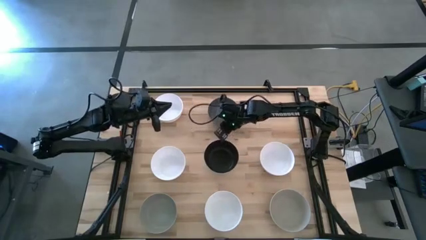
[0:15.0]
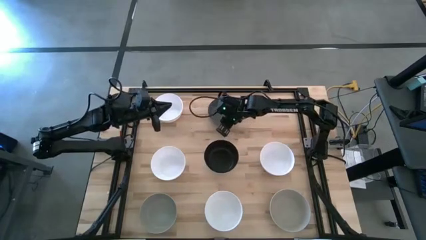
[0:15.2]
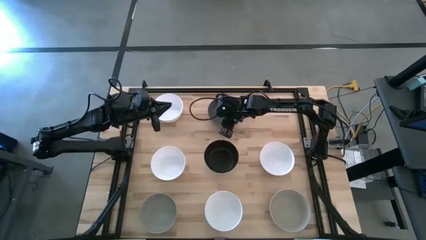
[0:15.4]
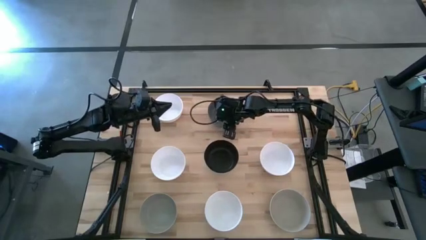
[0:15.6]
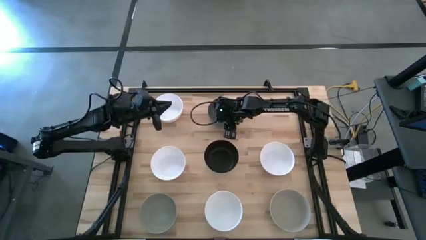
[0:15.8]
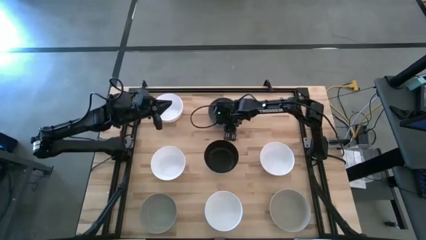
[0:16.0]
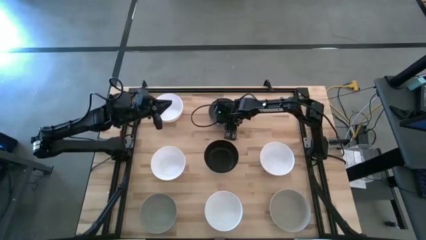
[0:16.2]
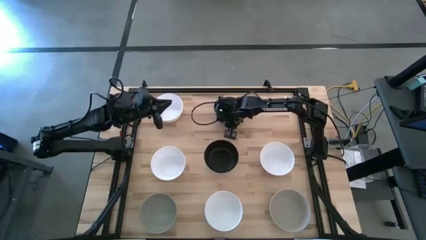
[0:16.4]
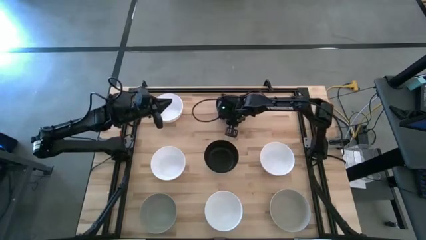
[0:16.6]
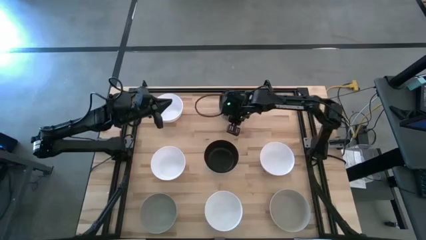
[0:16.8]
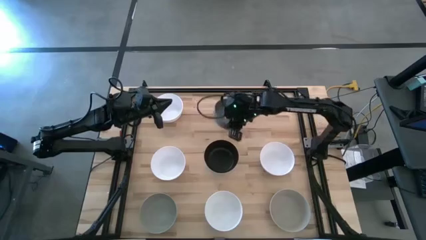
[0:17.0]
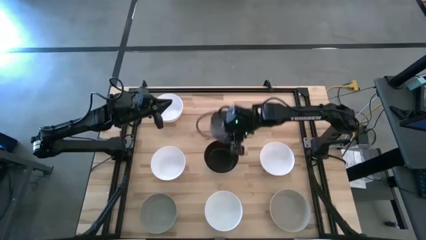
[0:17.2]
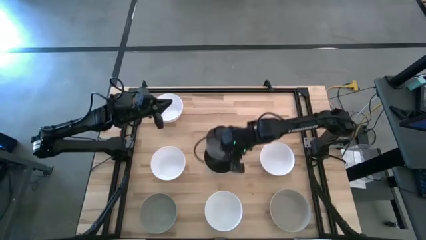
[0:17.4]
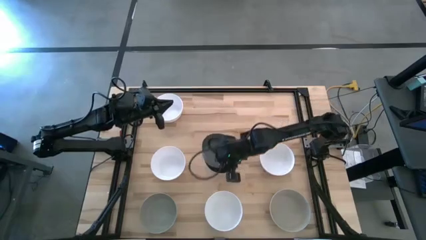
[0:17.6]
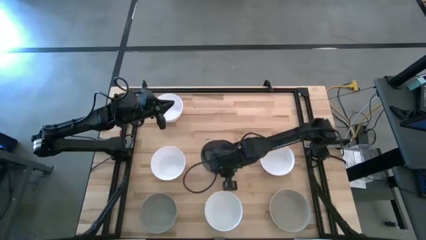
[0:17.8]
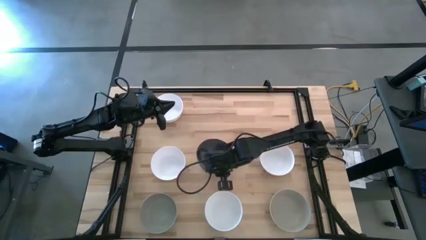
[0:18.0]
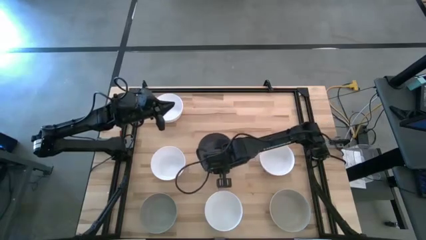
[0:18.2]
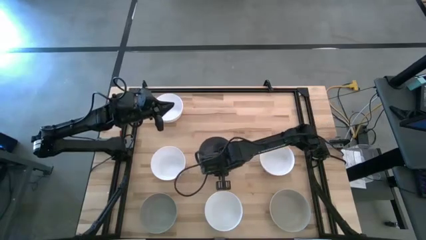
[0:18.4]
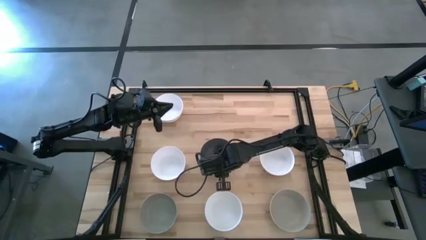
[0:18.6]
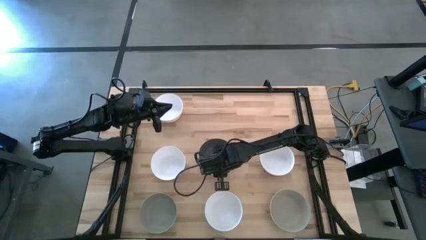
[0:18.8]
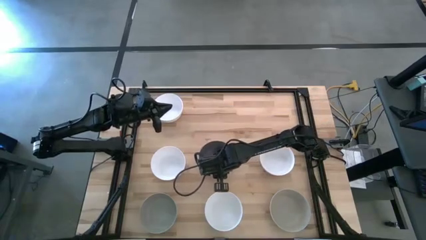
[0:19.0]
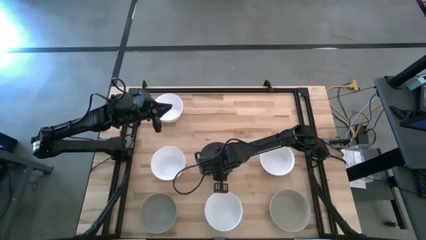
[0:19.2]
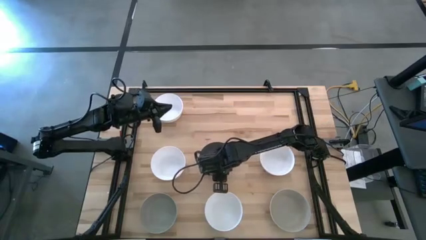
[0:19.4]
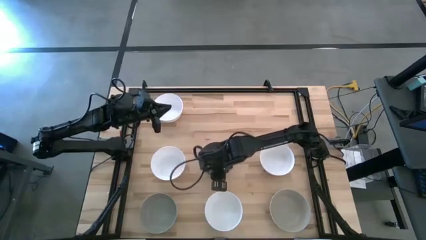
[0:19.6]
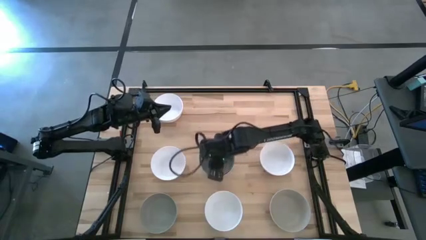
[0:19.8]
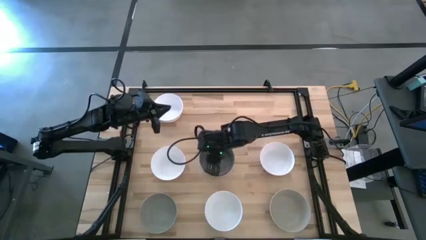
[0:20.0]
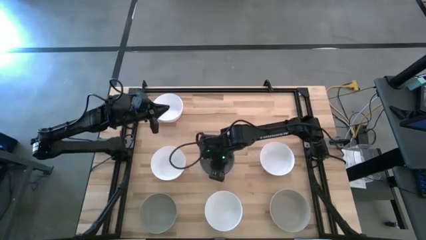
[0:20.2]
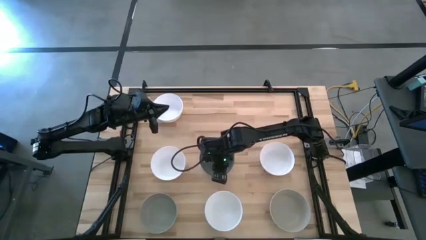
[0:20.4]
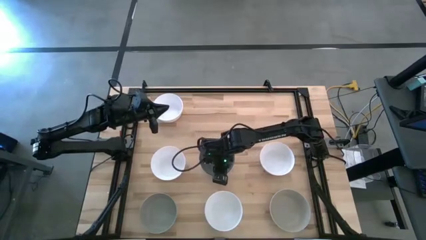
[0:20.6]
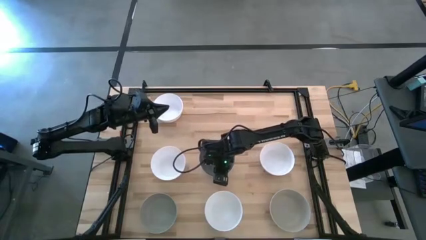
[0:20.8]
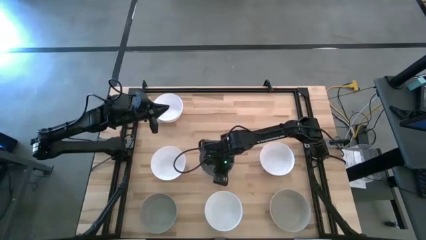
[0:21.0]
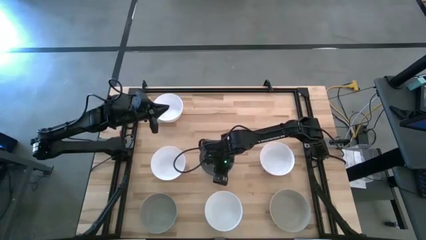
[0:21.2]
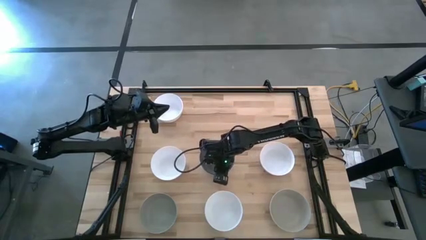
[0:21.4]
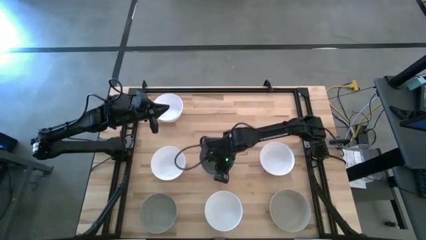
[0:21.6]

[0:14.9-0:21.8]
Task: Nest bowls inside each other
Stack the gray bowl on the black bowl

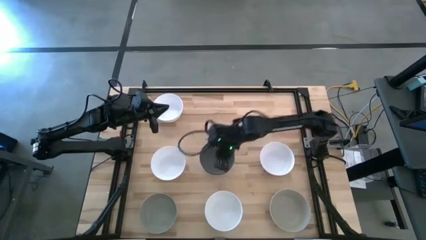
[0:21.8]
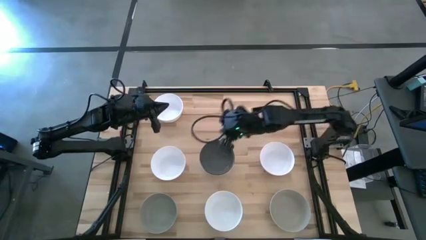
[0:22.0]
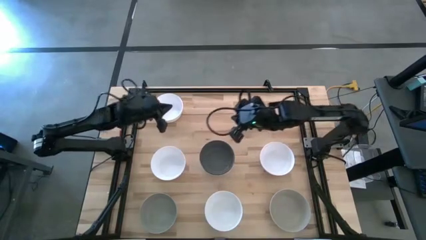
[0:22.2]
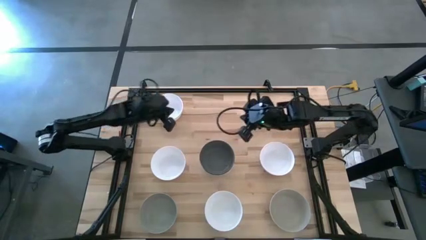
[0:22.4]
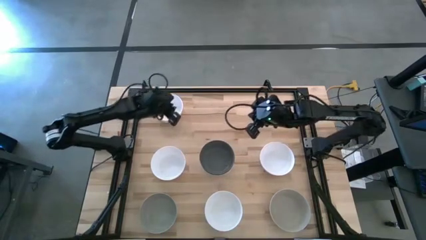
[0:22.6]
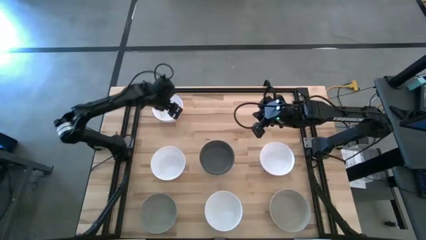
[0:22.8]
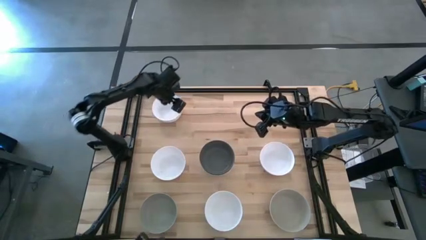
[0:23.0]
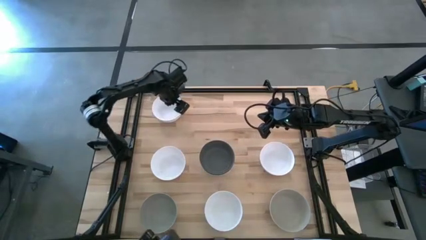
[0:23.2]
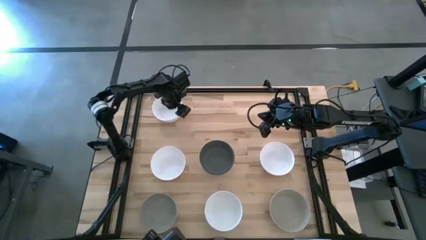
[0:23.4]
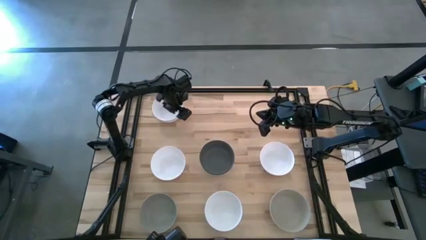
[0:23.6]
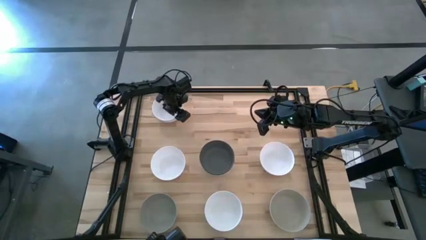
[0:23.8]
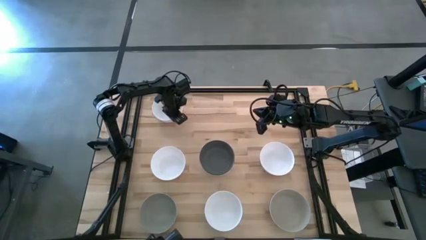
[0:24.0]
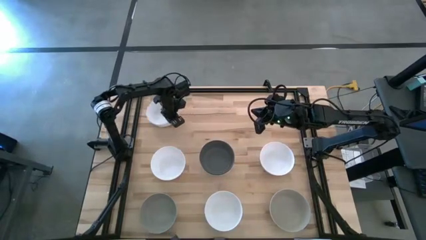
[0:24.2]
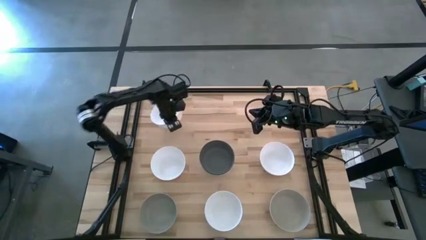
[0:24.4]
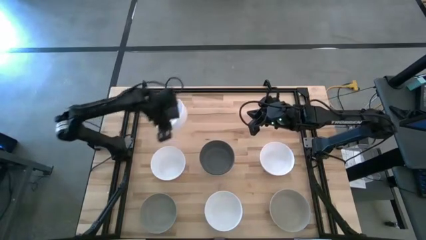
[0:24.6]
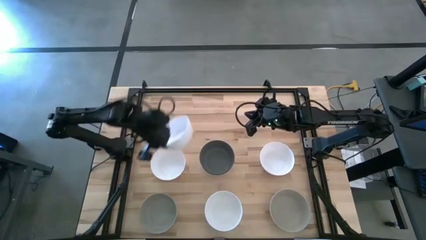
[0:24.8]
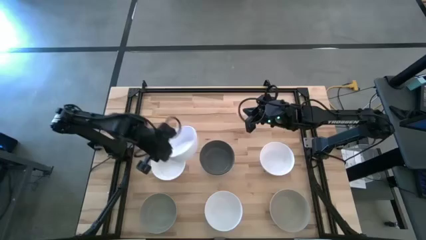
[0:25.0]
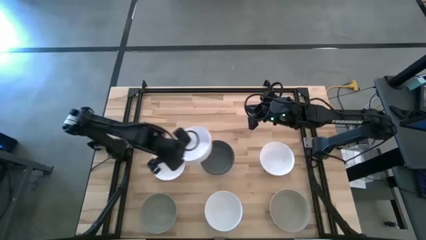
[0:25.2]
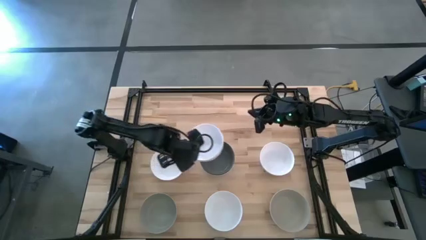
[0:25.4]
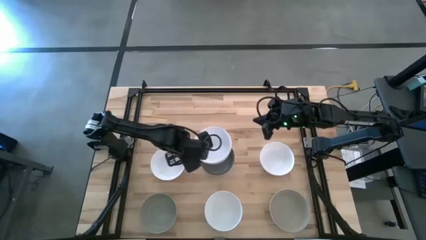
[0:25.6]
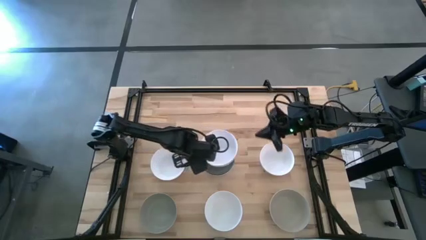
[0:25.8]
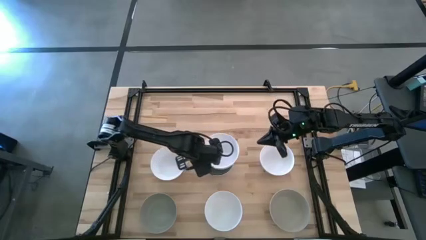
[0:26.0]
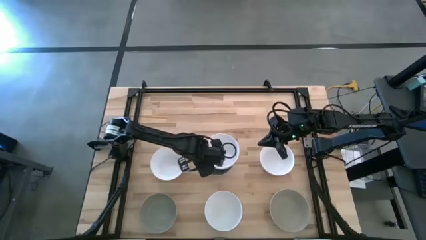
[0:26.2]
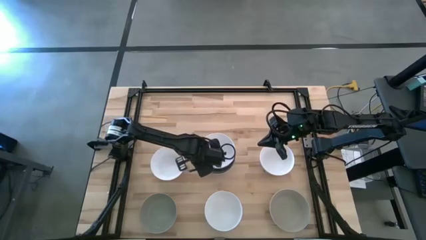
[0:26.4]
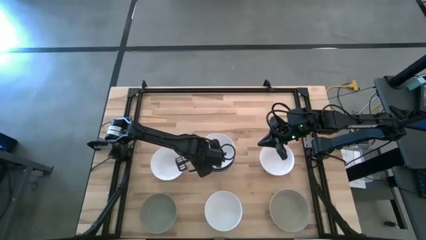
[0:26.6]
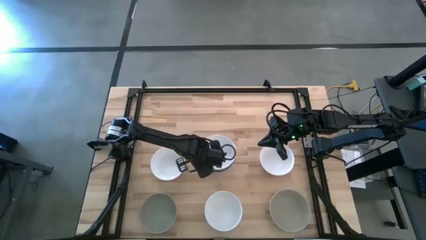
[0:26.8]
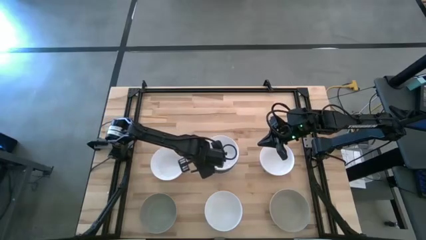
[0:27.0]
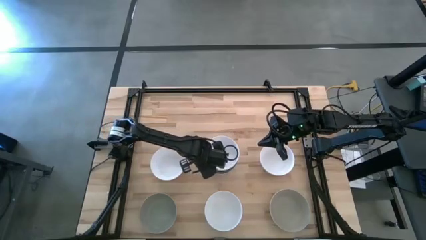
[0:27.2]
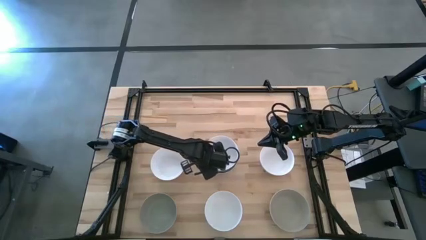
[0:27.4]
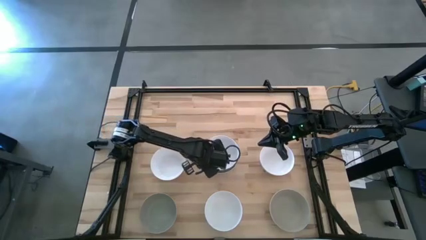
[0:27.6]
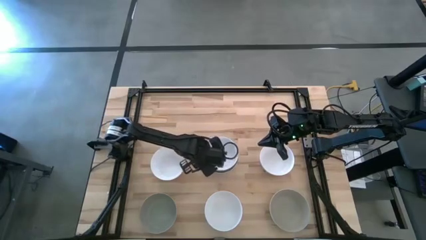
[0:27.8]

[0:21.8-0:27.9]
Stack the white bowl on the gray bowl
